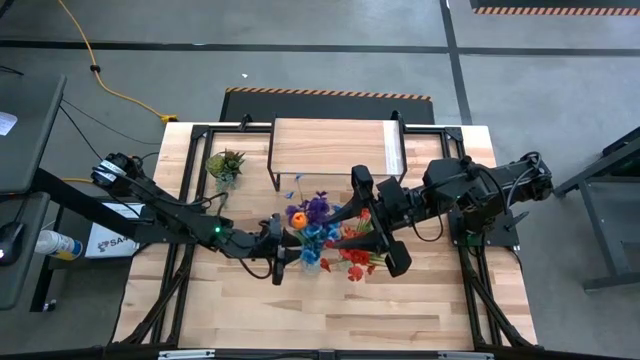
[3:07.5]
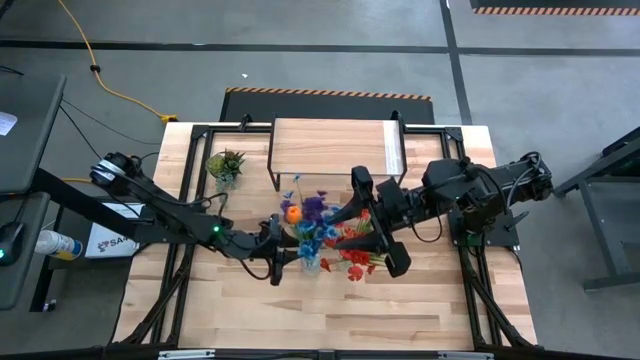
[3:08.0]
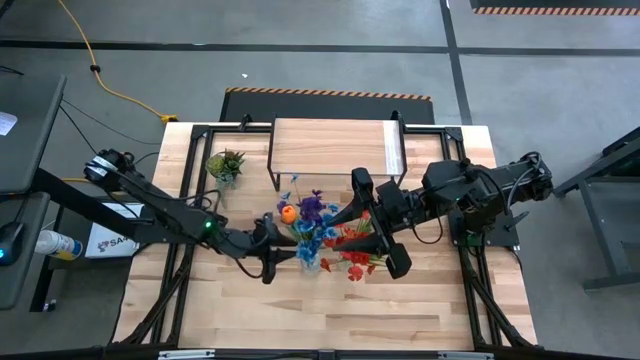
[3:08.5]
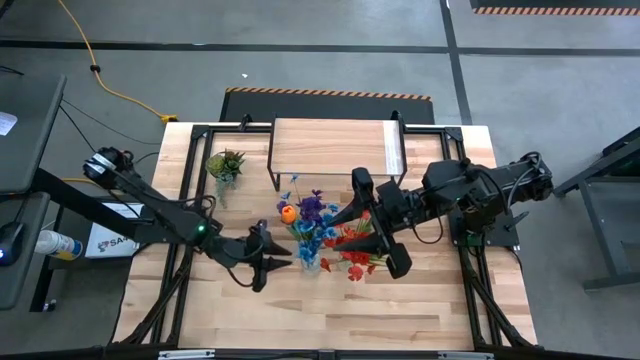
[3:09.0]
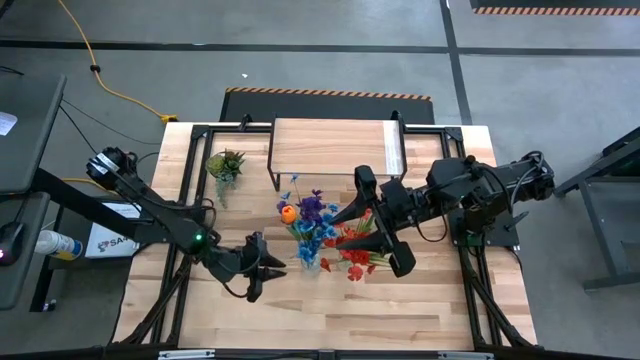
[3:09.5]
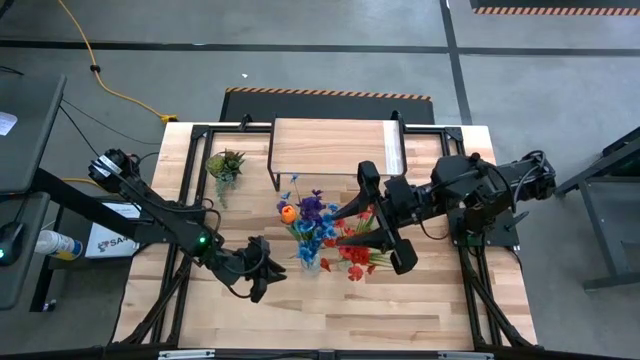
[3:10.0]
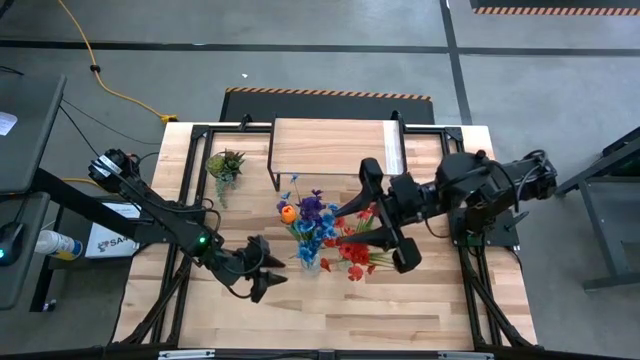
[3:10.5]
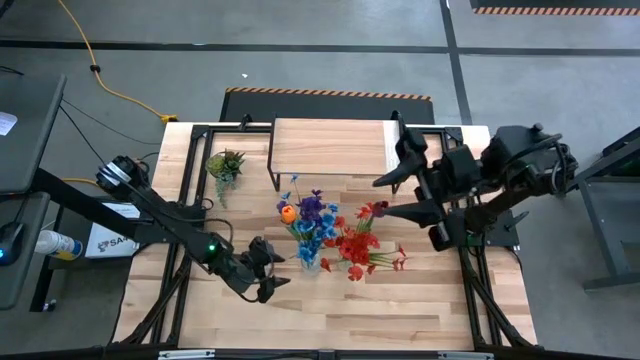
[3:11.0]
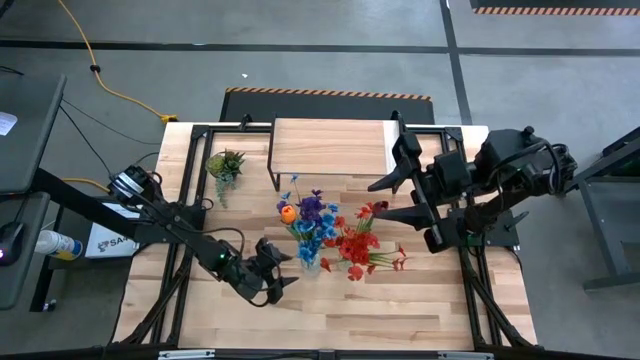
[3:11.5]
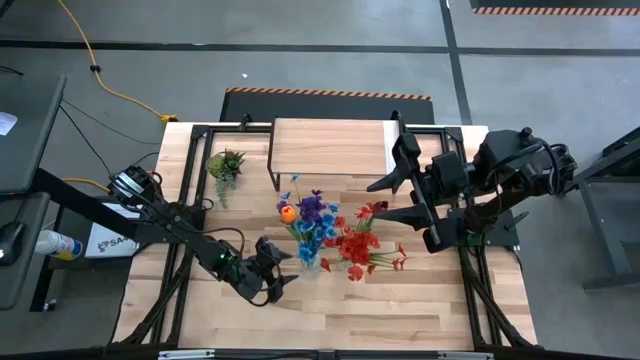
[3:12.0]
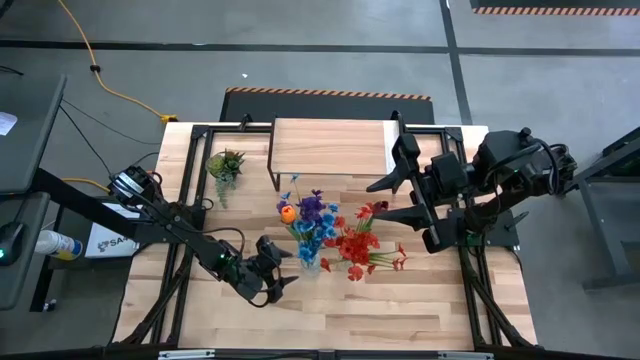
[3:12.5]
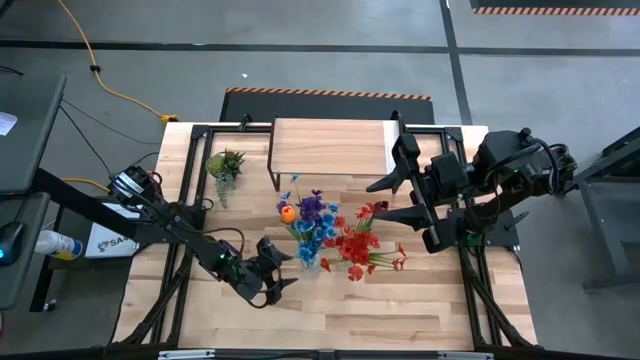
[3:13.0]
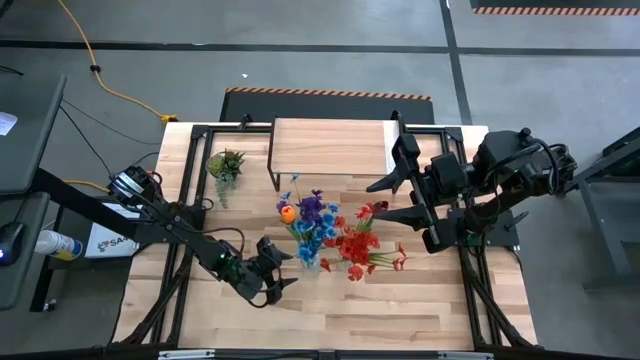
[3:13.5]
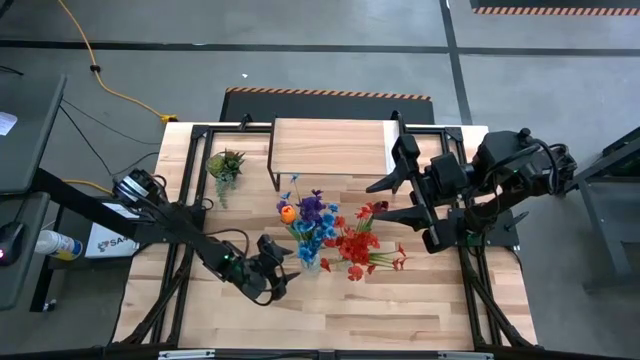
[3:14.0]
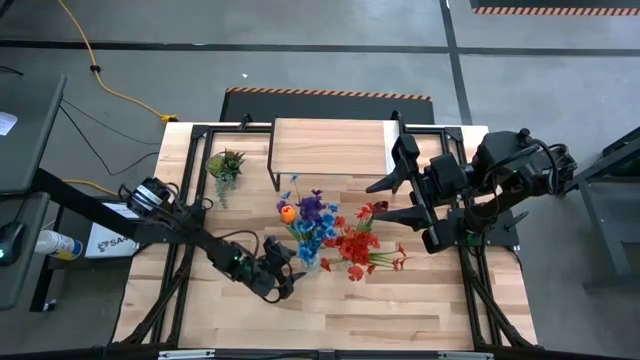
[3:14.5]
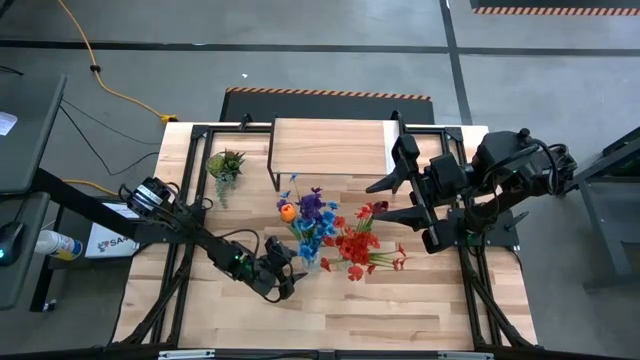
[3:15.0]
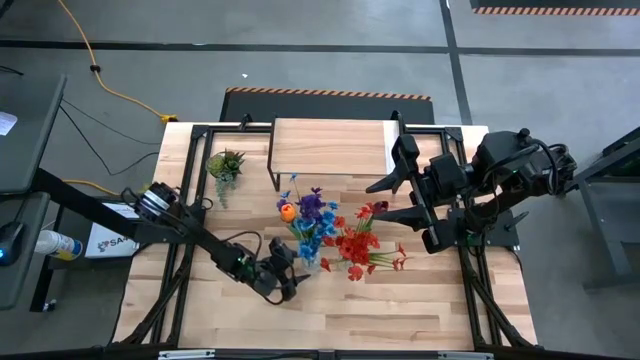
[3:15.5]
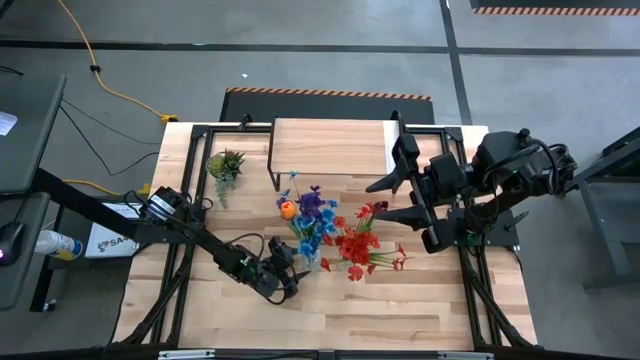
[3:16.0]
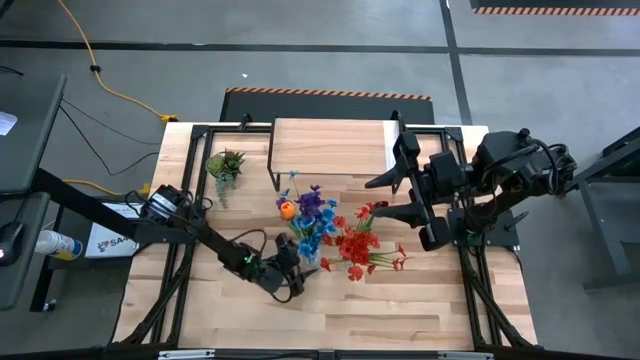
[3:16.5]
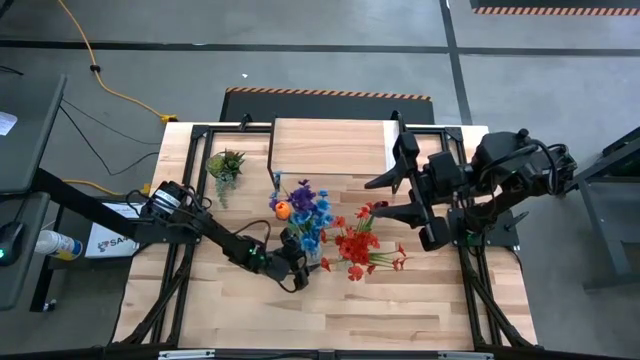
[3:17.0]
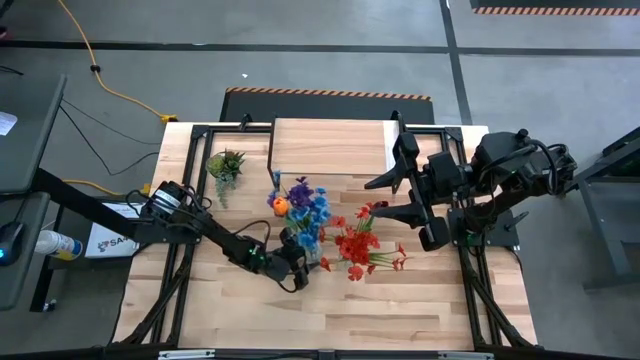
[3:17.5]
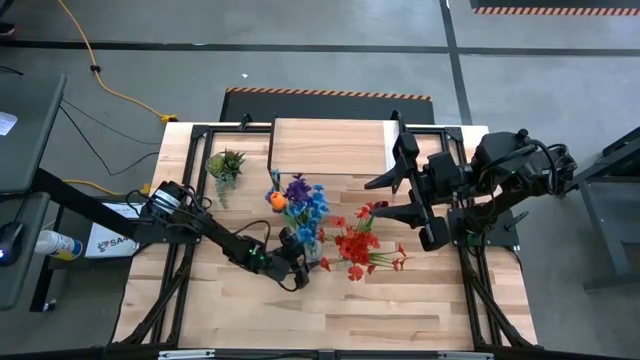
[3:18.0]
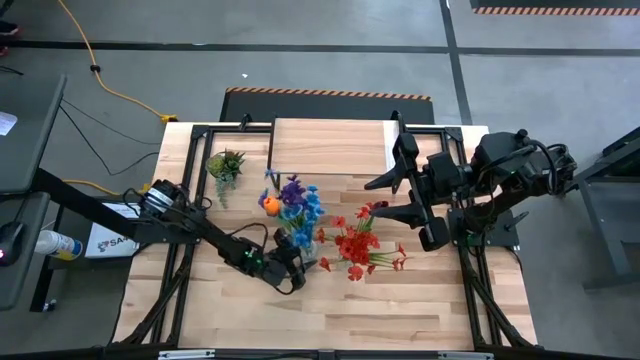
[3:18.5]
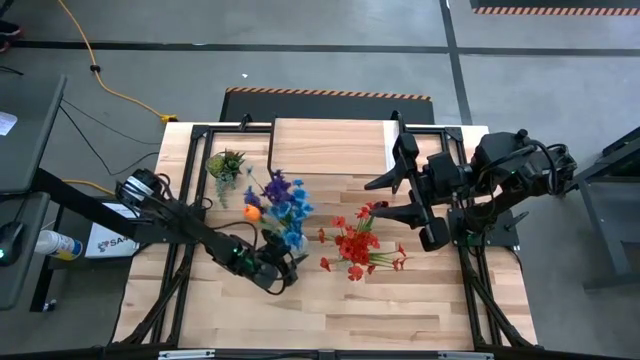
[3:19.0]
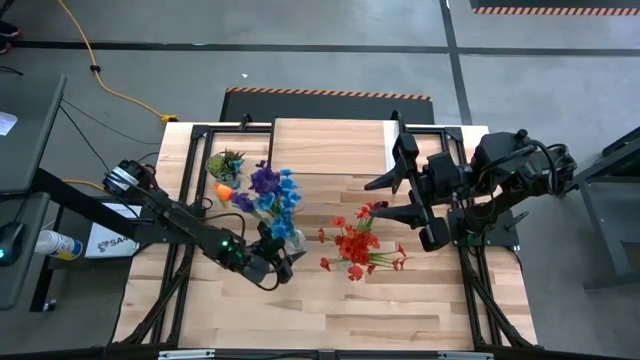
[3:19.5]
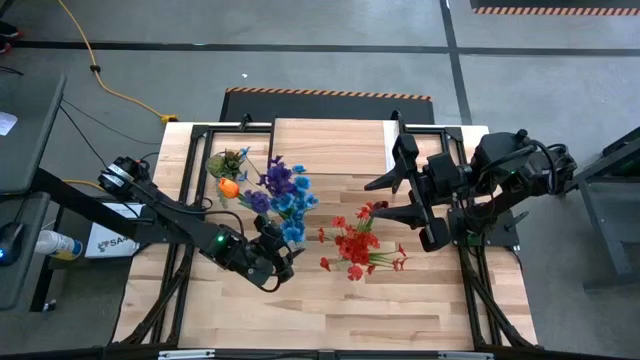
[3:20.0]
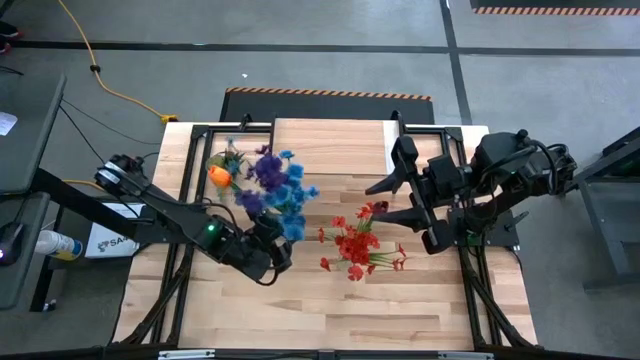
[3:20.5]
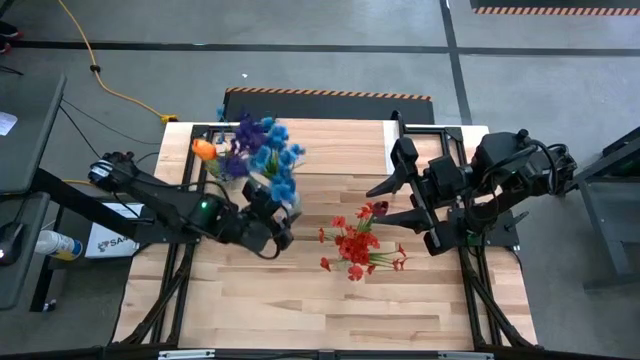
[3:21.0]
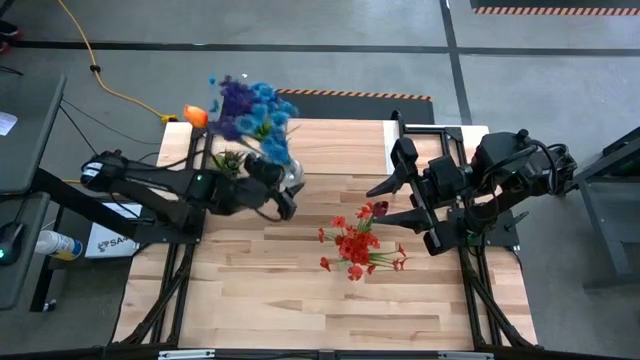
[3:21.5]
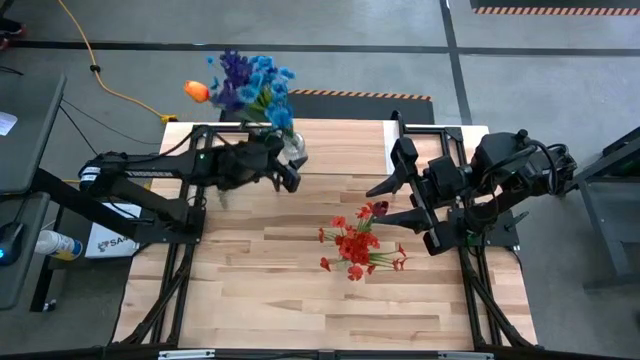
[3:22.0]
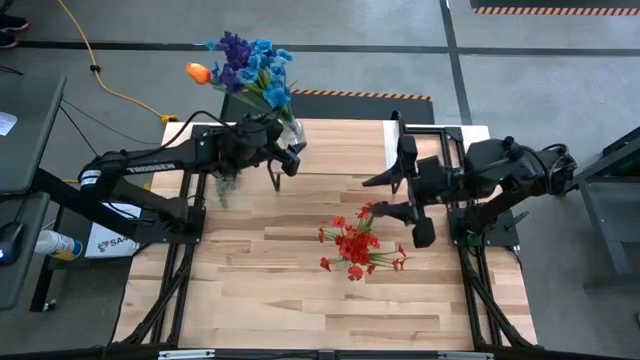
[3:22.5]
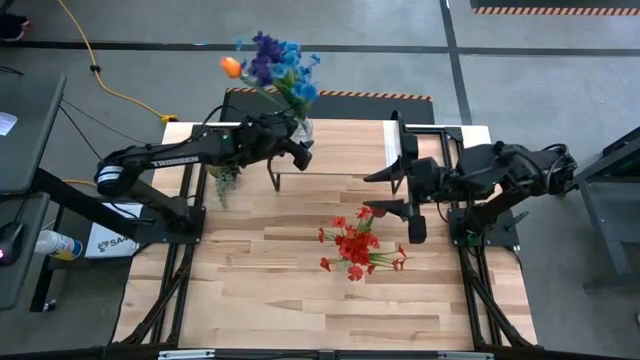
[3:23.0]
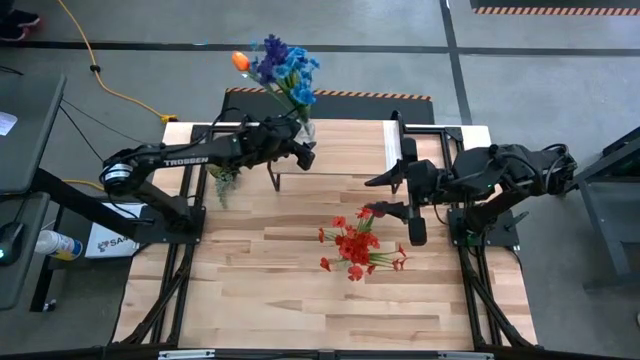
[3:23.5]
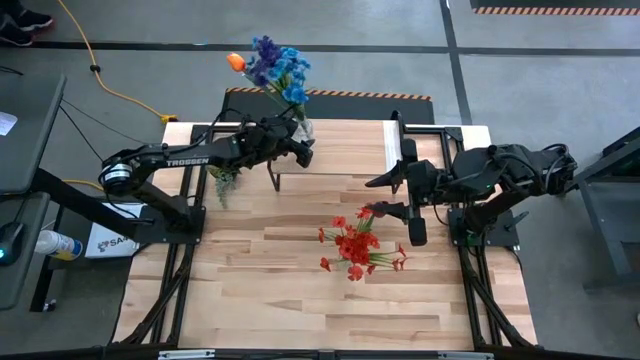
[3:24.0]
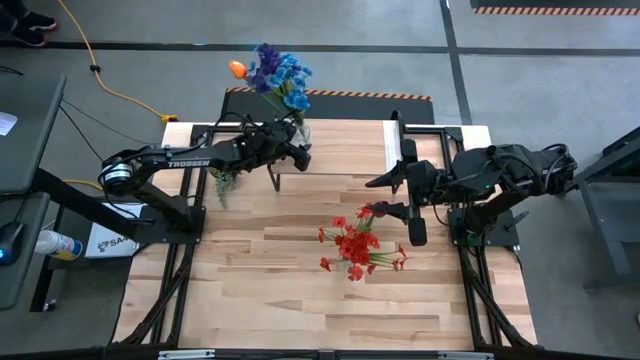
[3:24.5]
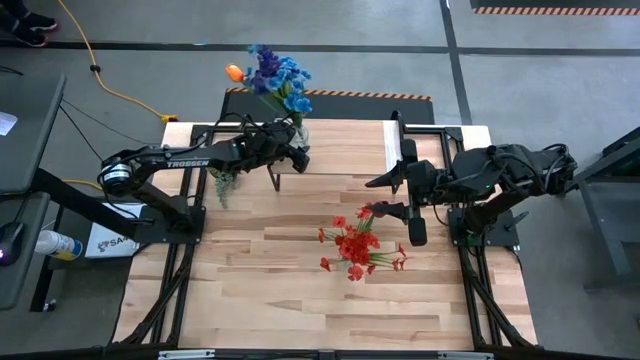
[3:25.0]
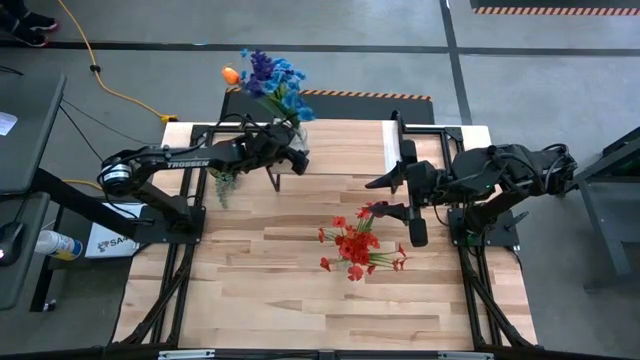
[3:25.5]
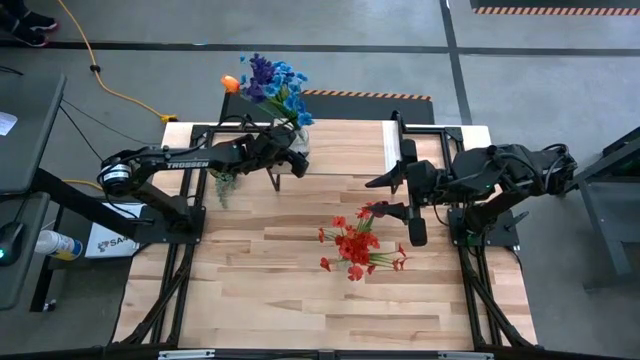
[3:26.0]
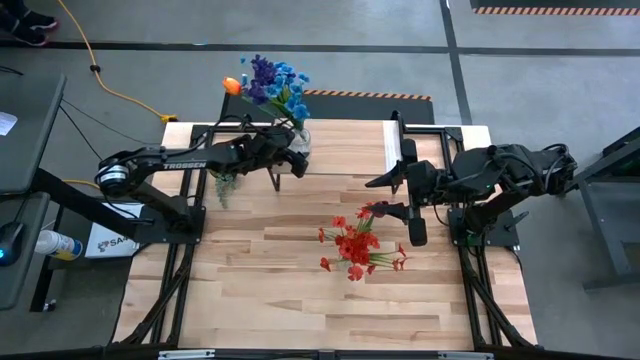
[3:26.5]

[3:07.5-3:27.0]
Task: Pick and place flowers into a vace then onto a shelf
Put the left transparent vase with flowers on the shelf
